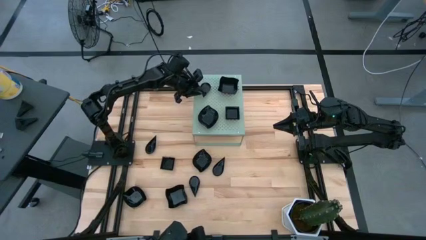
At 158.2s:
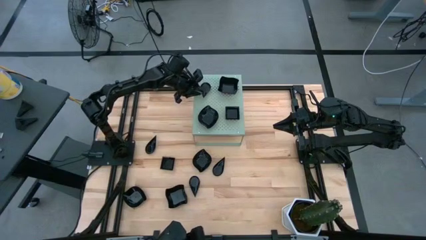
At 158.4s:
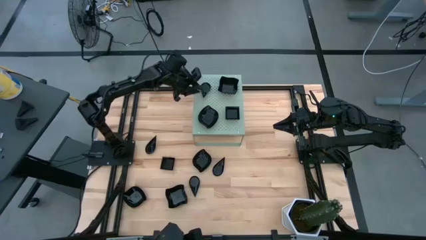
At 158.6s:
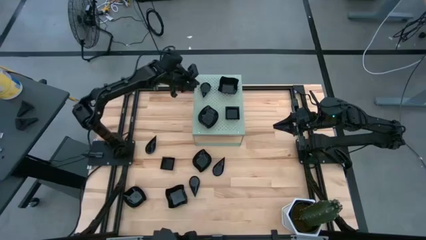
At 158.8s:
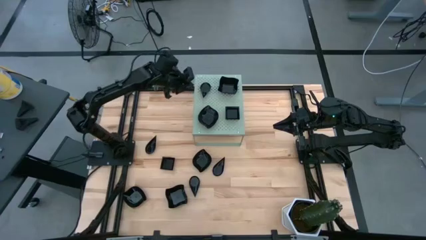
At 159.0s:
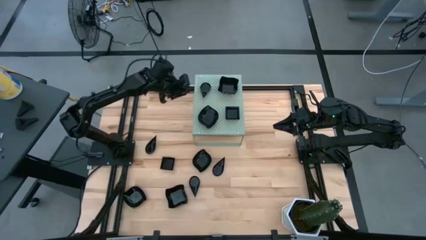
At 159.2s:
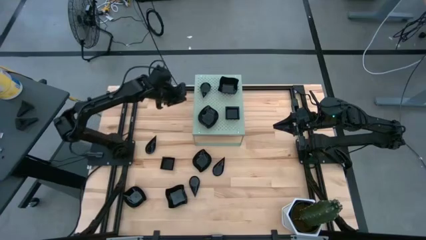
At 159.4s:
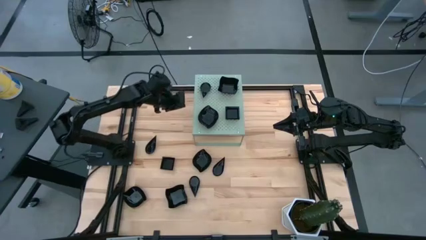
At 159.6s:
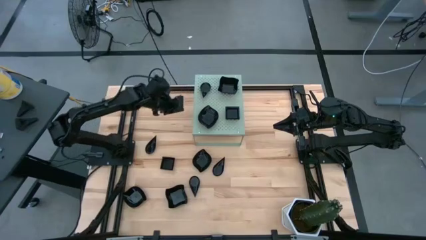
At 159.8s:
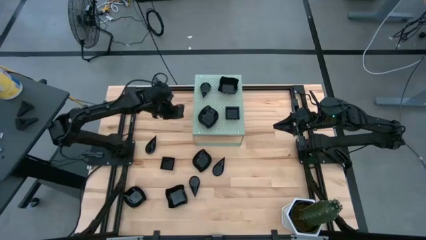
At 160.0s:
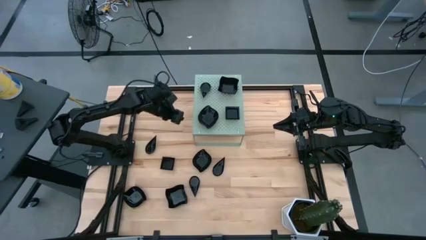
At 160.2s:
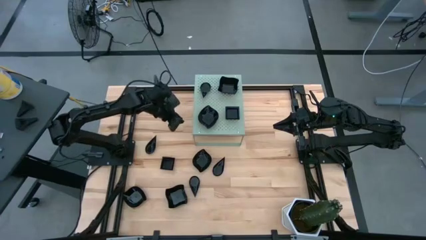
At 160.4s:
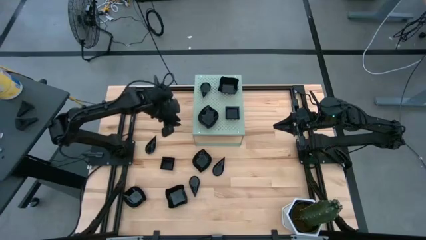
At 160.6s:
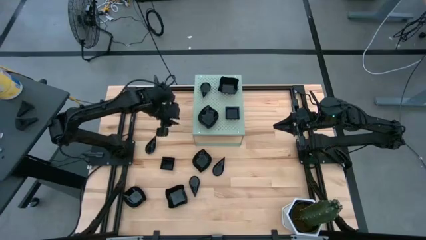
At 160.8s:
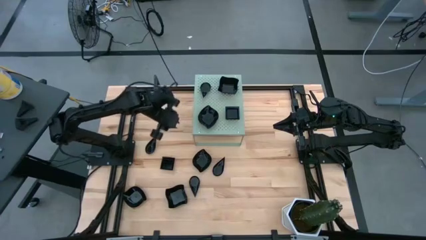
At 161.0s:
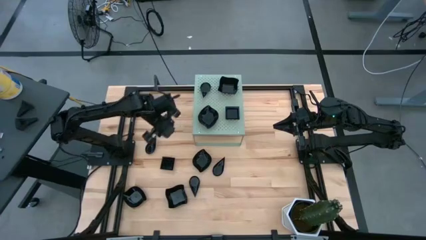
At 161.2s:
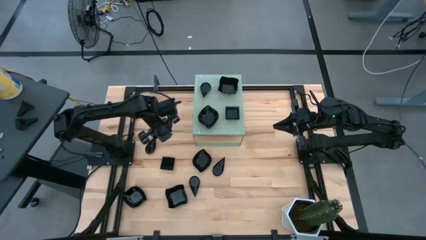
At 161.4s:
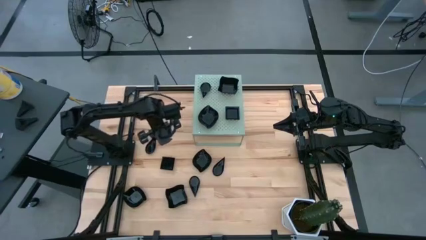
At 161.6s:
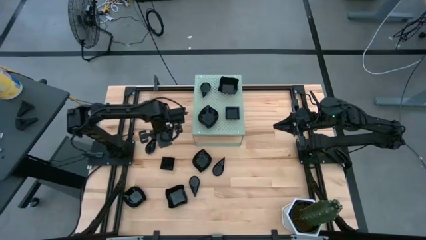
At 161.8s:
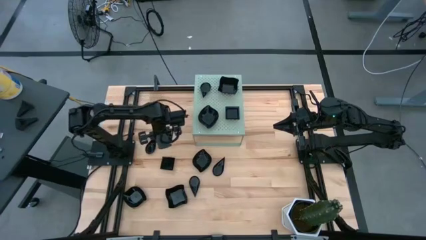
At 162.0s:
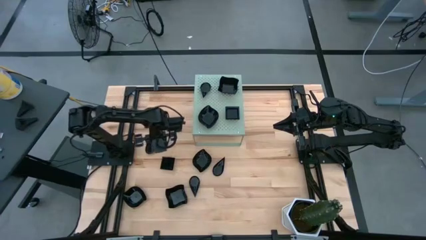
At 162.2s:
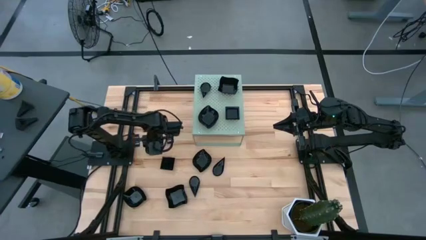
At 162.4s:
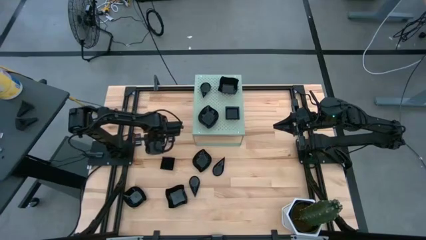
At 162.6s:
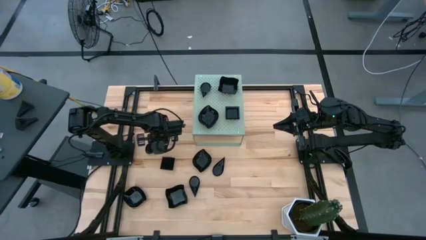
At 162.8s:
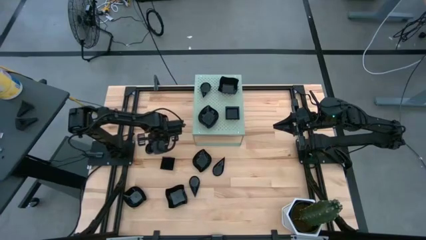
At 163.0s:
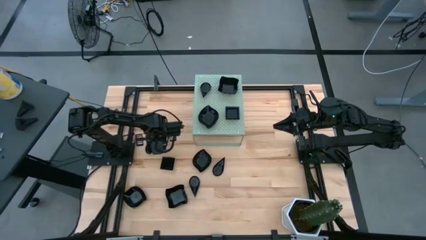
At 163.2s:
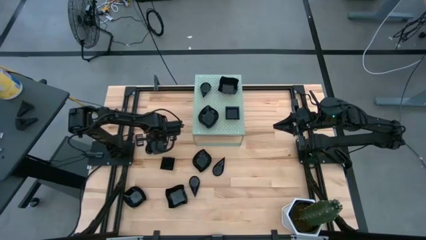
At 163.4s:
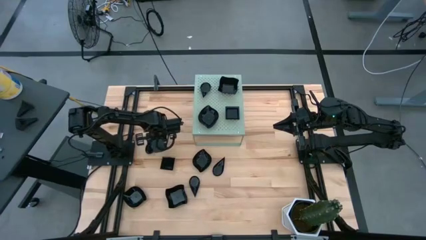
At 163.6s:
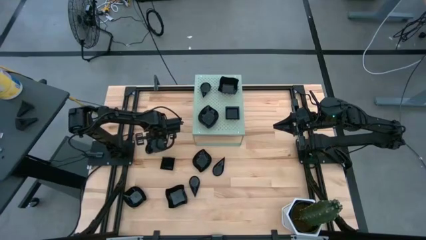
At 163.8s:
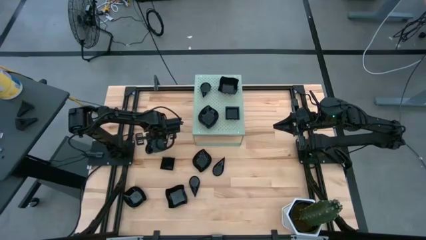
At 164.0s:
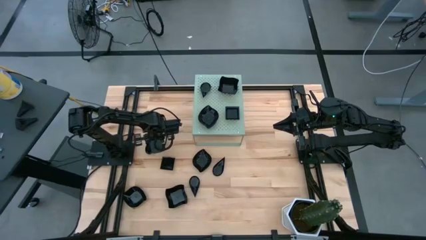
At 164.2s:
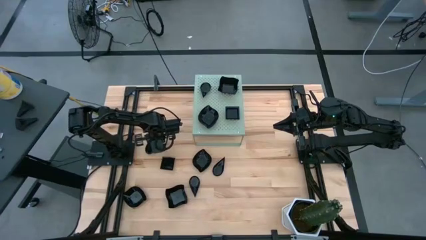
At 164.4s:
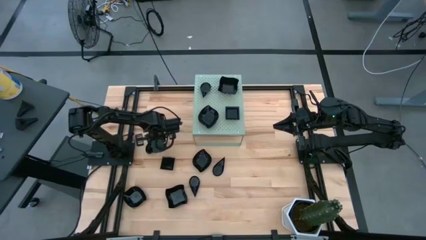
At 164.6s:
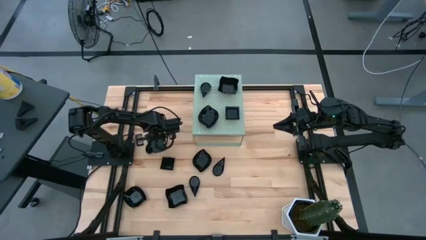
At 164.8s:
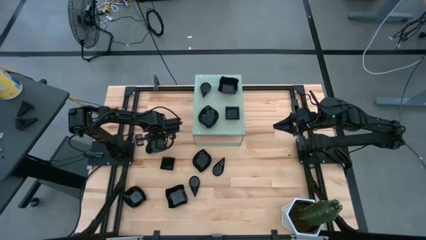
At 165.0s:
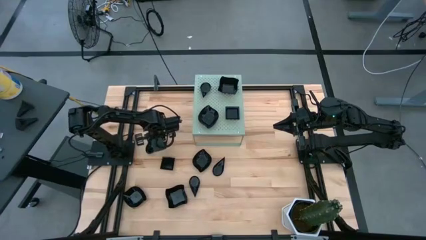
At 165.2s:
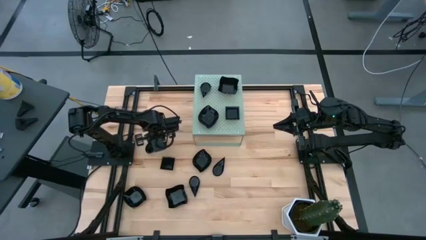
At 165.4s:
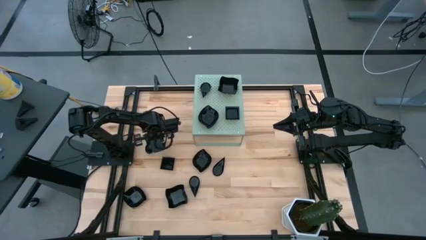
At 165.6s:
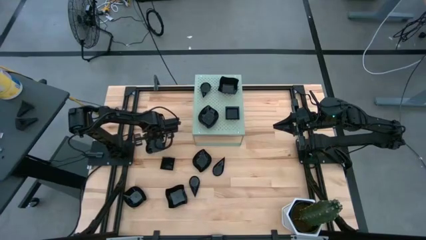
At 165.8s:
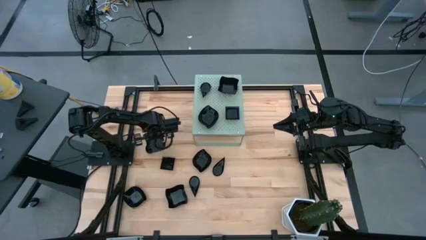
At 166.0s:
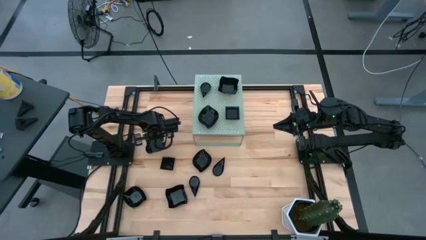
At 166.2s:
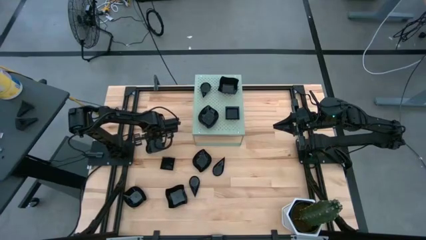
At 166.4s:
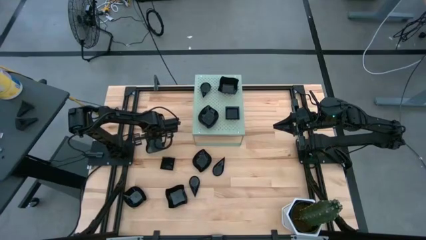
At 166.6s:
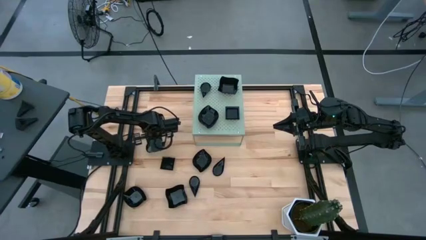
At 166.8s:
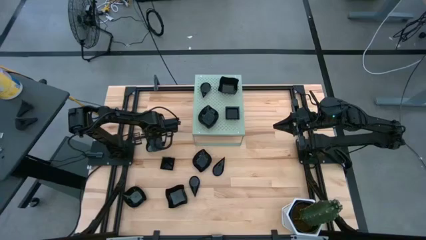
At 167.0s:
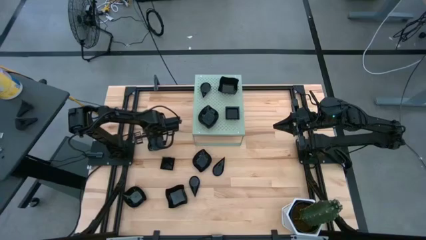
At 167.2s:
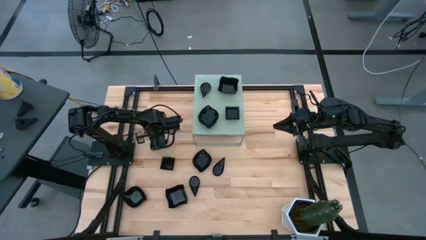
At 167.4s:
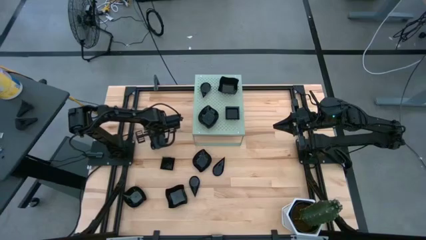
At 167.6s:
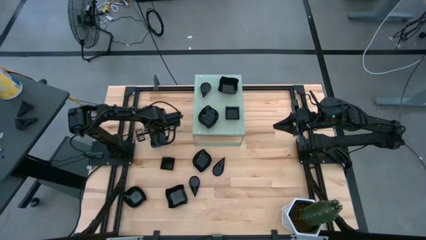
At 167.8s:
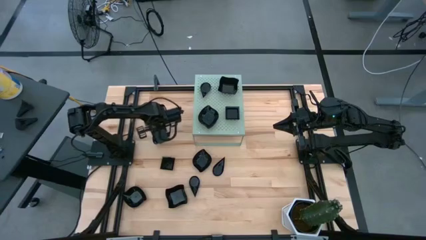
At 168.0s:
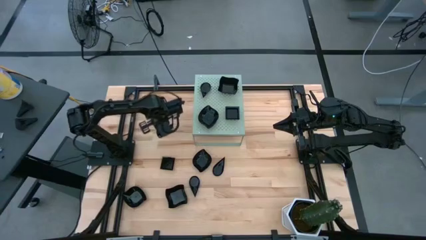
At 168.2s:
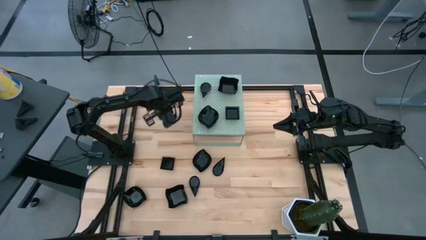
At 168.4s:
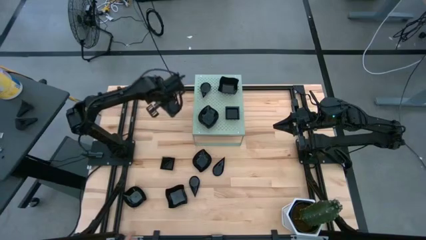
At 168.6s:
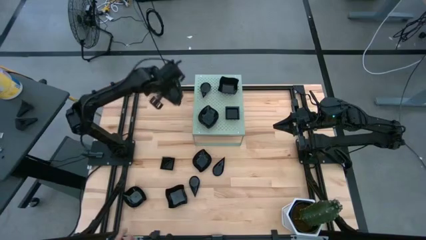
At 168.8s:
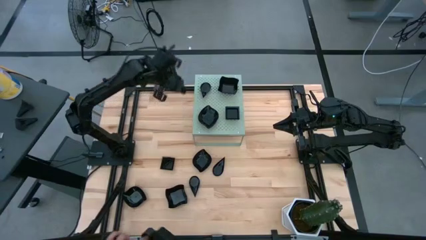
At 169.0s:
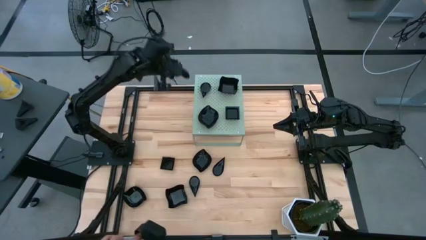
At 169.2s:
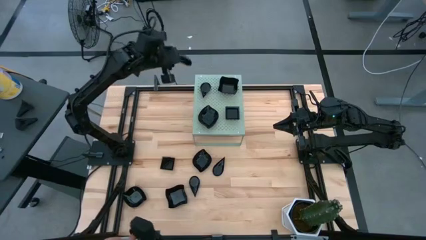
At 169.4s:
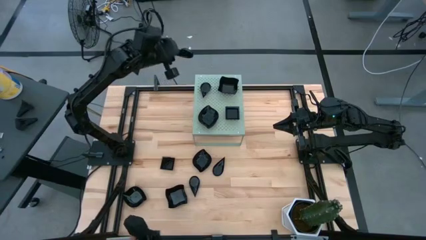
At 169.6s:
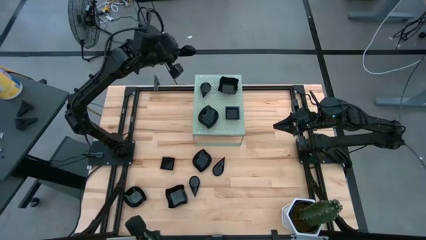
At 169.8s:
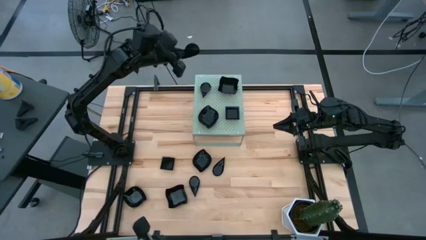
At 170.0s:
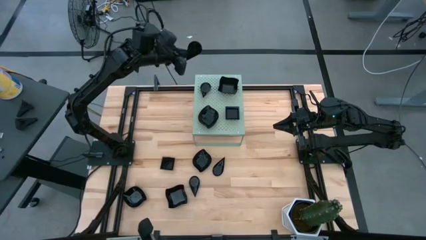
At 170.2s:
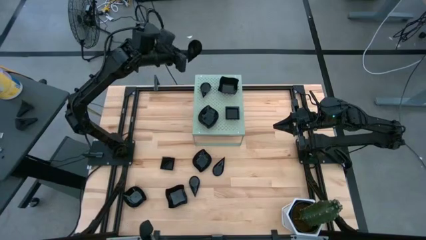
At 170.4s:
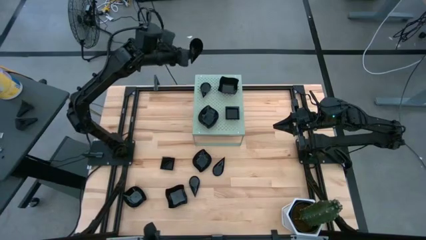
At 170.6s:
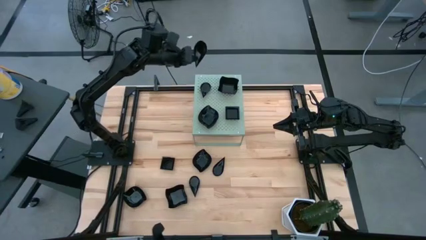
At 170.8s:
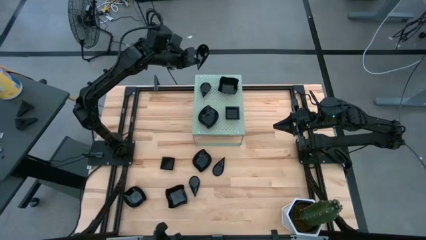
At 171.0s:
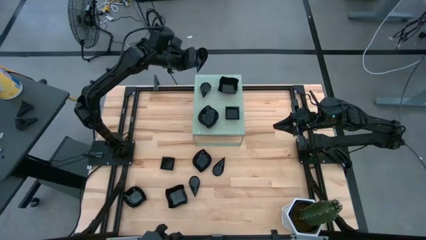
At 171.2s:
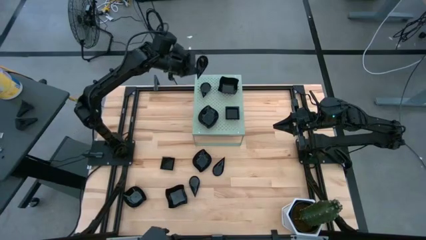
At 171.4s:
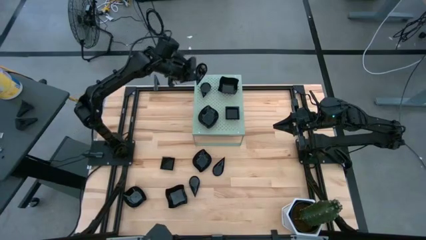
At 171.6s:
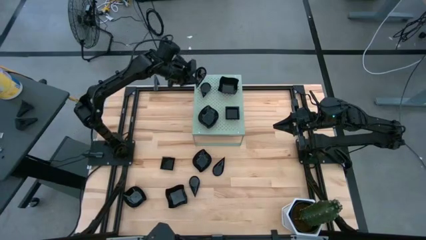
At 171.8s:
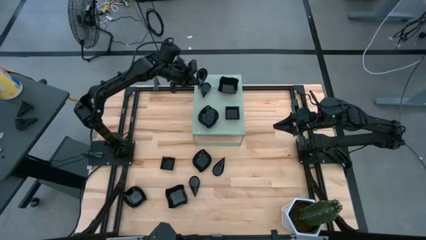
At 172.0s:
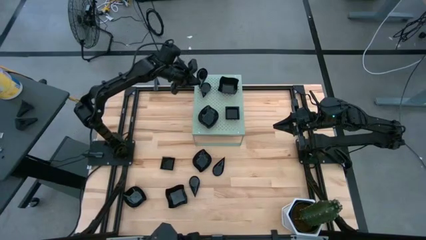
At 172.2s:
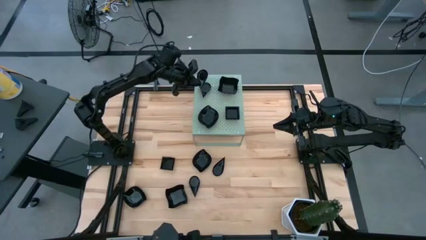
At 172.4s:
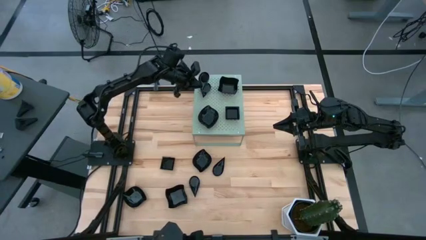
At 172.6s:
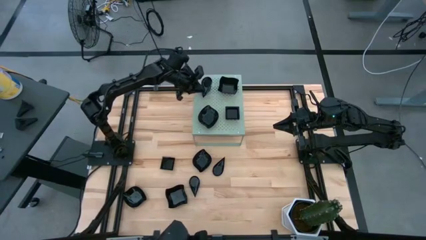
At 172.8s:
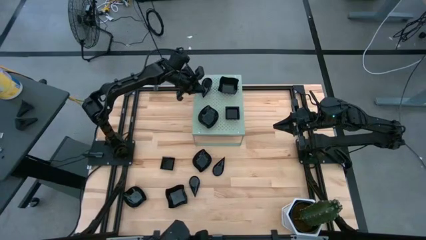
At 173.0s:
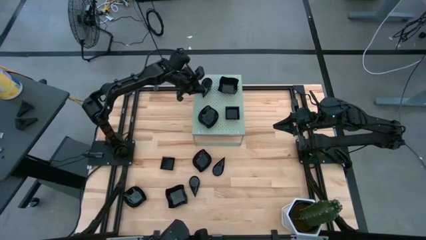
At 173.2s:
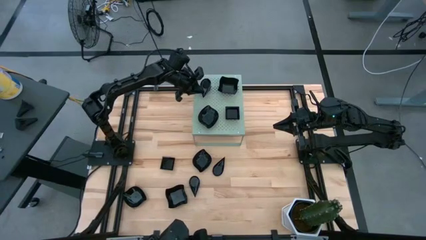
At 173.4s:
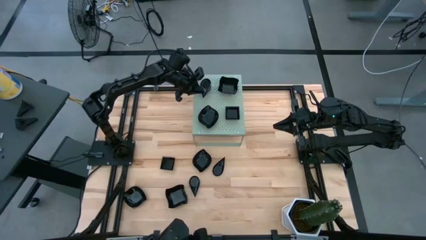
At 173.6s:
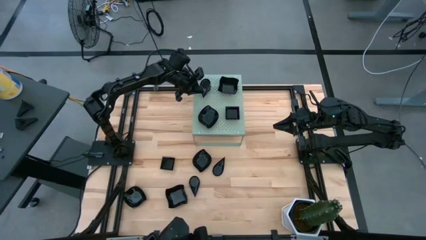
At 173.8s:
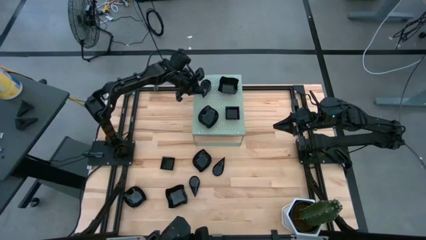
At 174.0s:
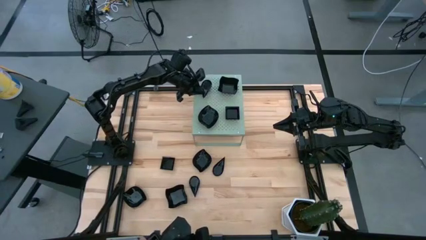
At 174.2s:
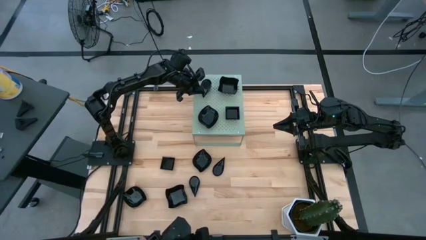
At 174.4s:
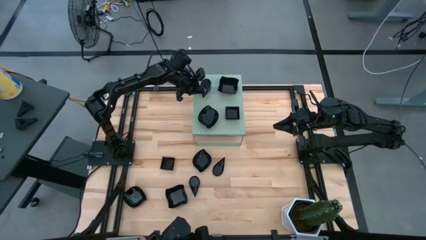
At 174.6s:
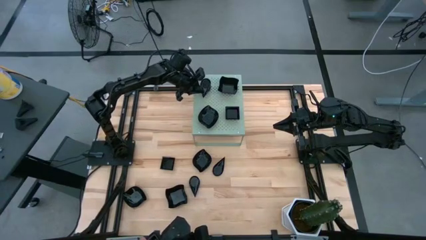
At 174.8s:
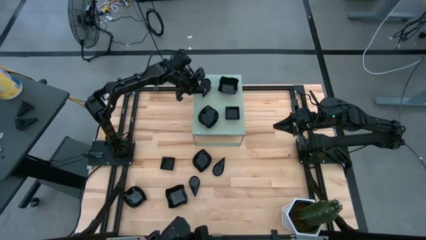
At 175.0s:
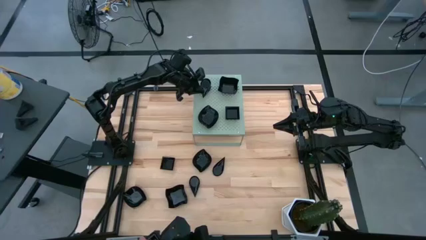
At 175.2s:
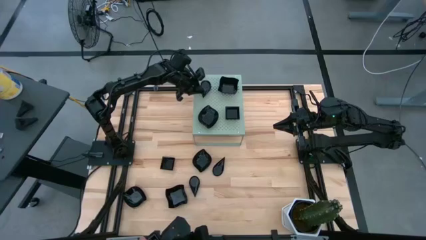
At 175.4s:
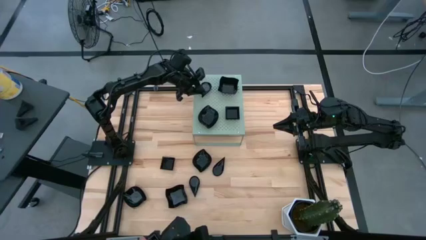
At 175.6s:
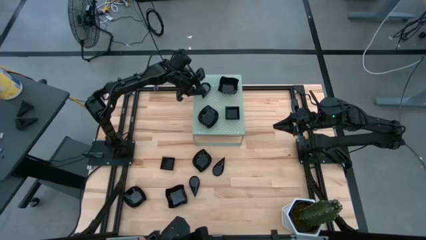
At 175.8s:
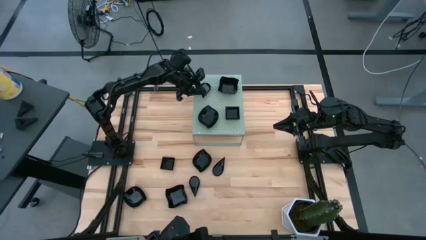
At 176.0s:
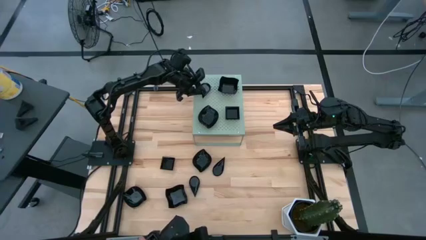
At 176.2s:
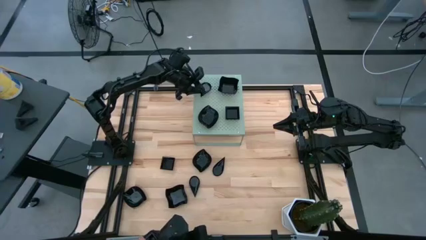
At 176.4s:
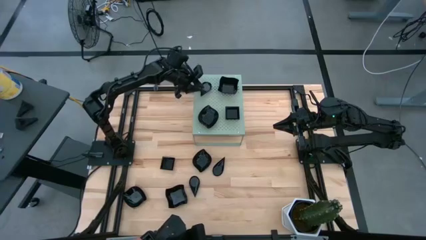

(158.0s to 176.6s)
Task: Pick & Place Mini shaped plates
Stack the drop shaped plate on top of the drop shaped plate on the shelf
